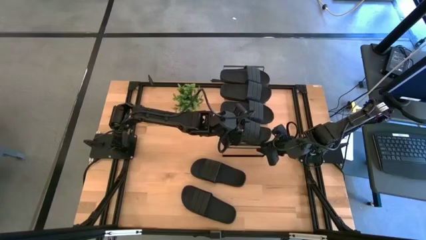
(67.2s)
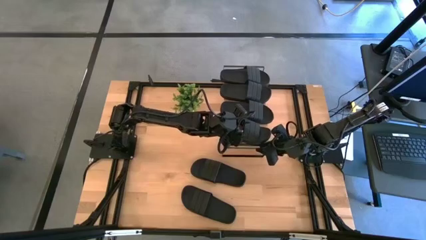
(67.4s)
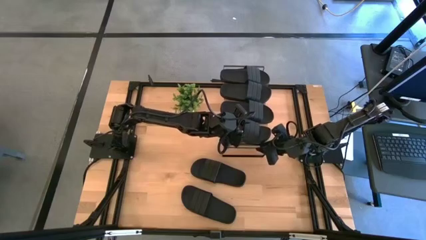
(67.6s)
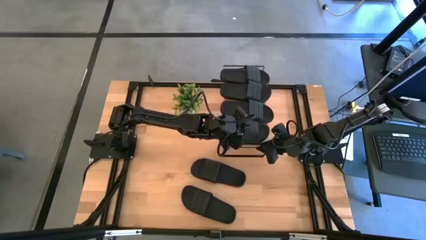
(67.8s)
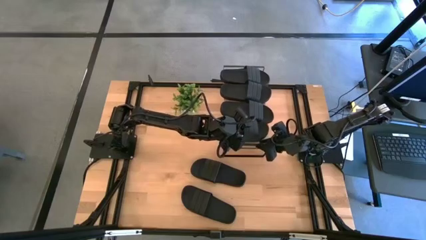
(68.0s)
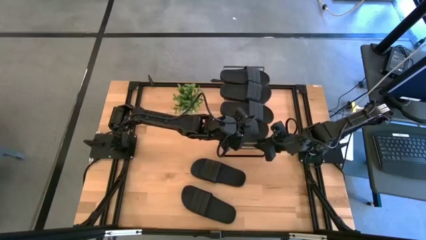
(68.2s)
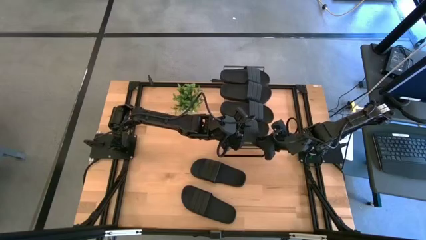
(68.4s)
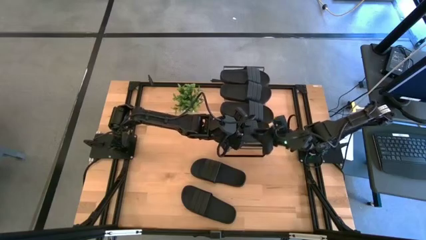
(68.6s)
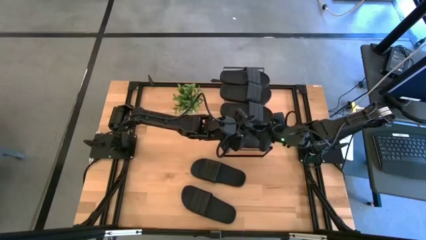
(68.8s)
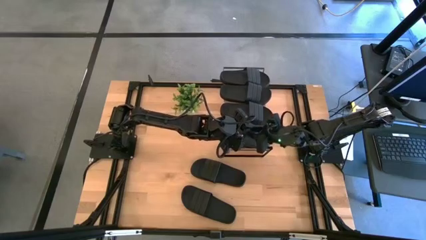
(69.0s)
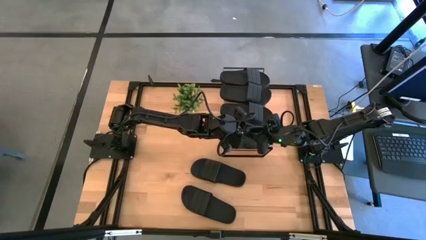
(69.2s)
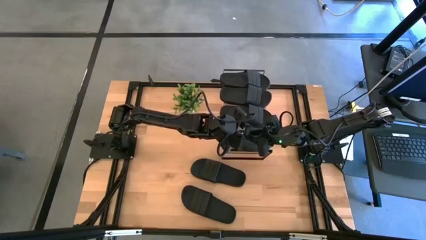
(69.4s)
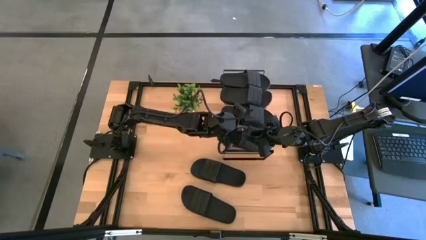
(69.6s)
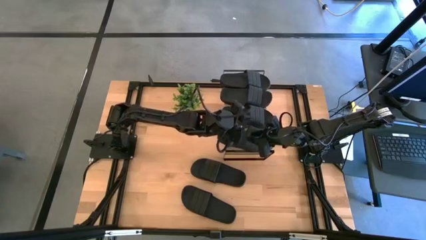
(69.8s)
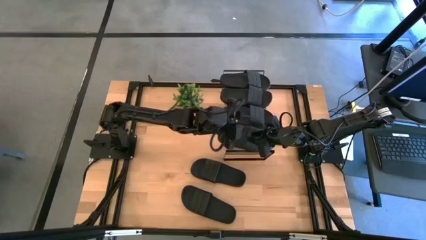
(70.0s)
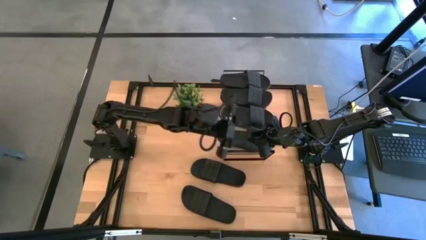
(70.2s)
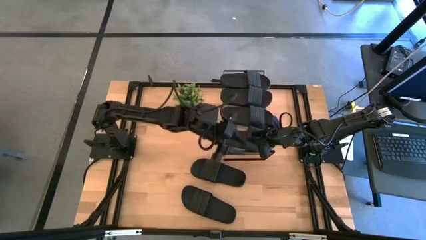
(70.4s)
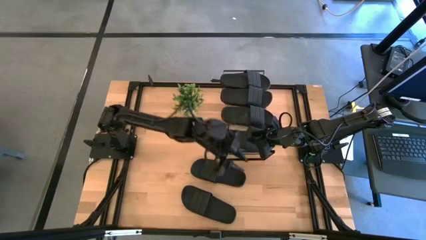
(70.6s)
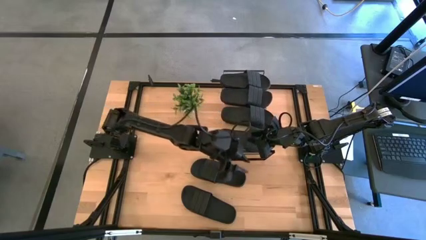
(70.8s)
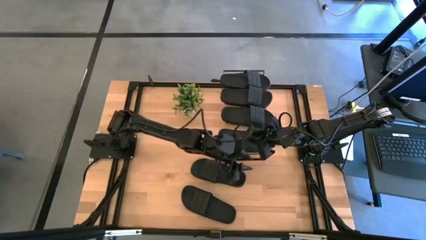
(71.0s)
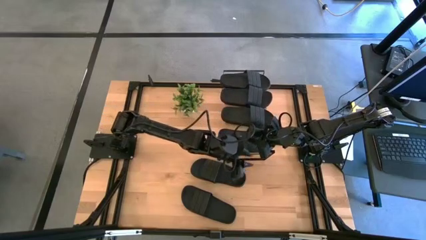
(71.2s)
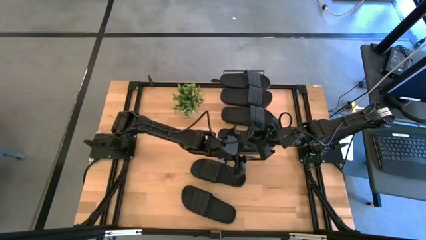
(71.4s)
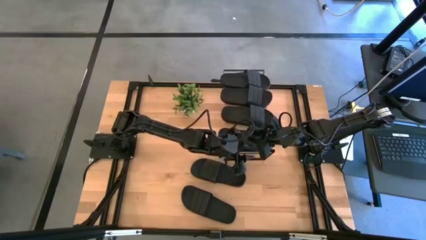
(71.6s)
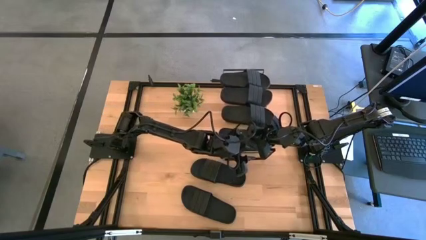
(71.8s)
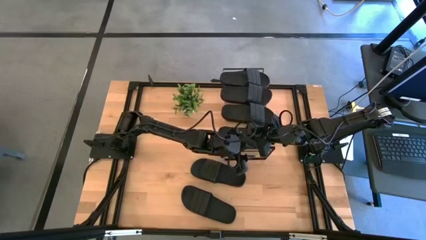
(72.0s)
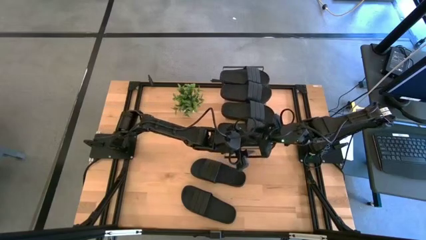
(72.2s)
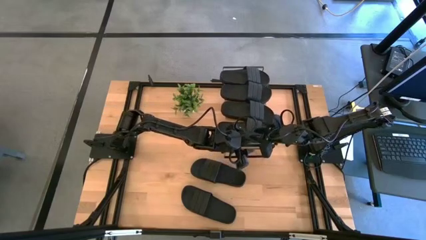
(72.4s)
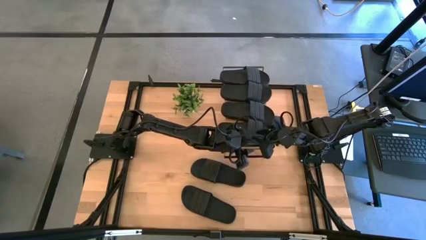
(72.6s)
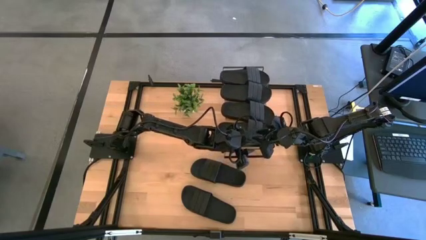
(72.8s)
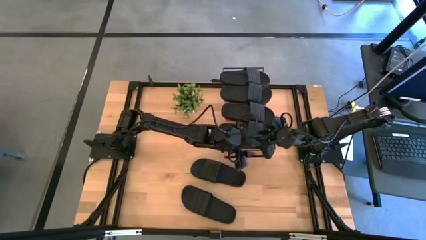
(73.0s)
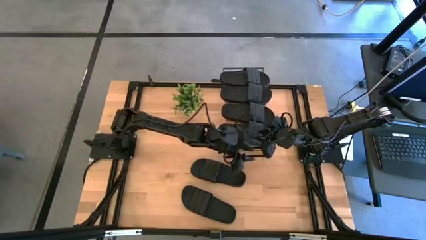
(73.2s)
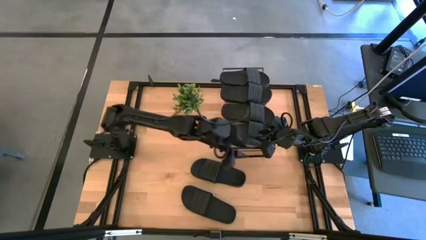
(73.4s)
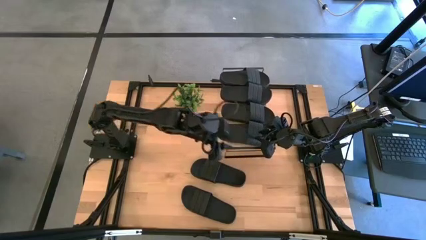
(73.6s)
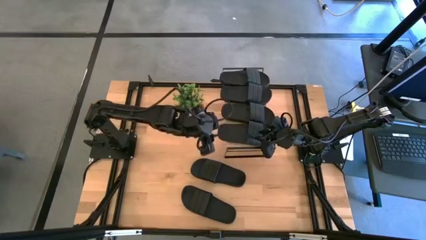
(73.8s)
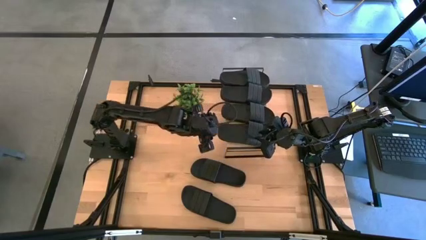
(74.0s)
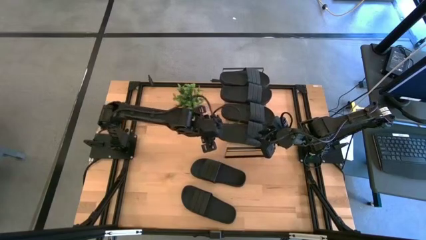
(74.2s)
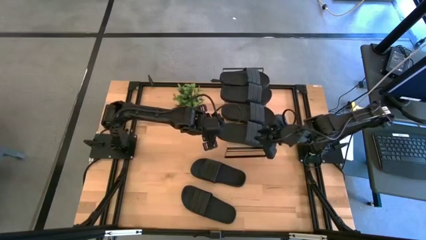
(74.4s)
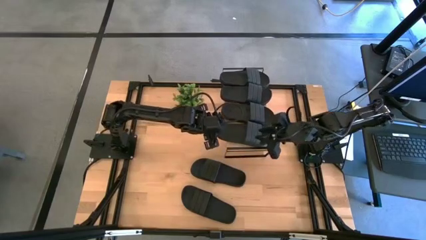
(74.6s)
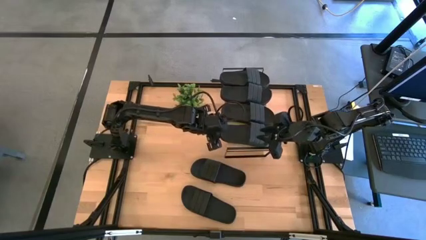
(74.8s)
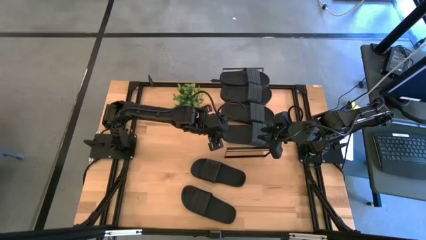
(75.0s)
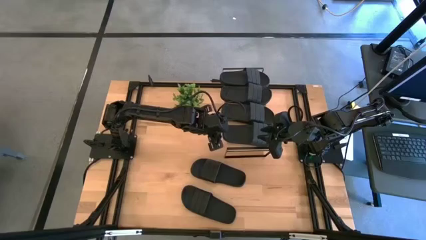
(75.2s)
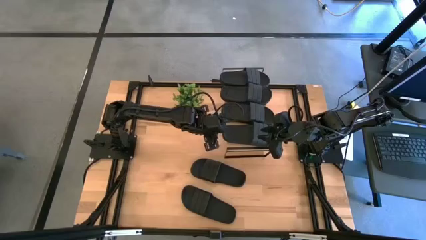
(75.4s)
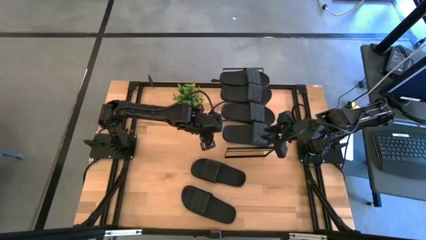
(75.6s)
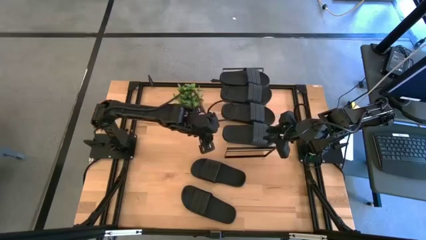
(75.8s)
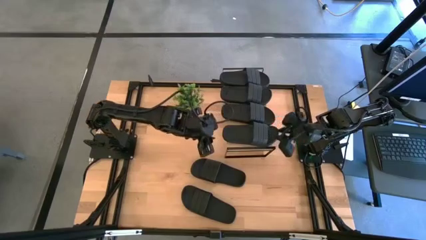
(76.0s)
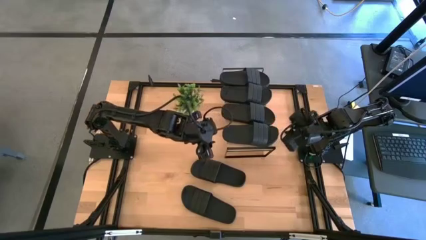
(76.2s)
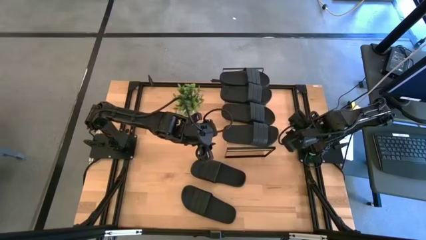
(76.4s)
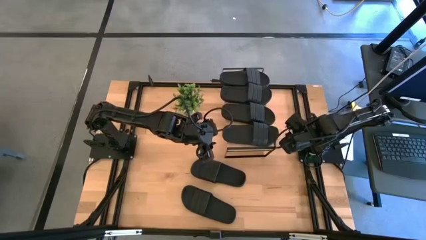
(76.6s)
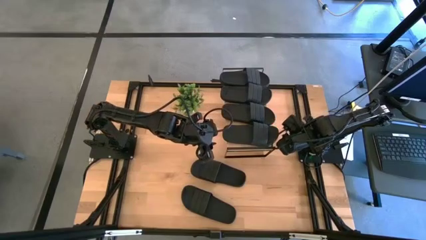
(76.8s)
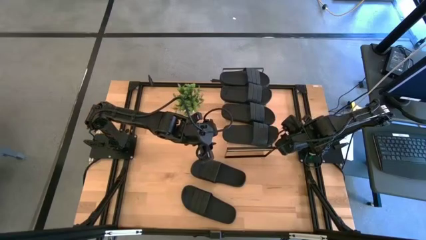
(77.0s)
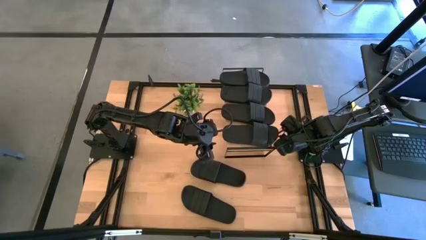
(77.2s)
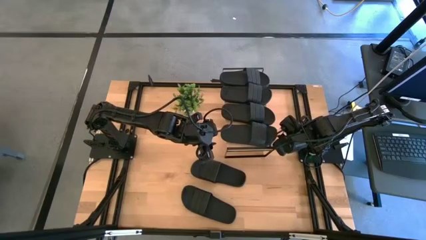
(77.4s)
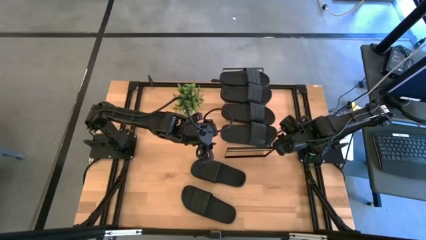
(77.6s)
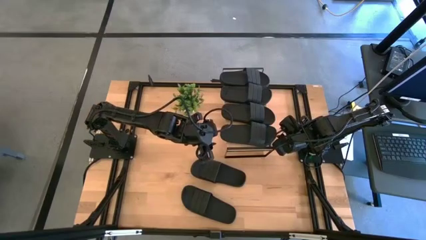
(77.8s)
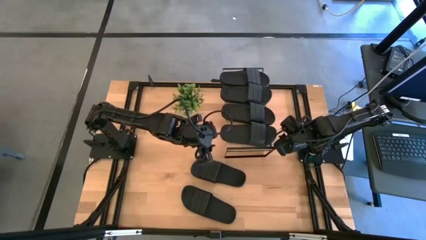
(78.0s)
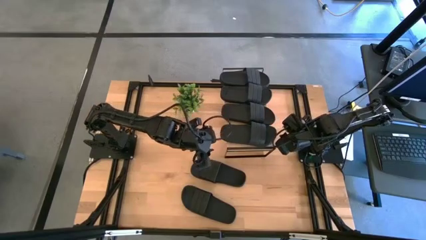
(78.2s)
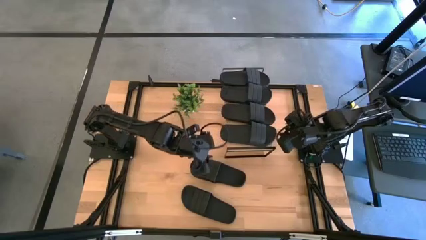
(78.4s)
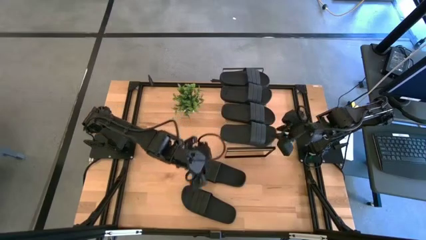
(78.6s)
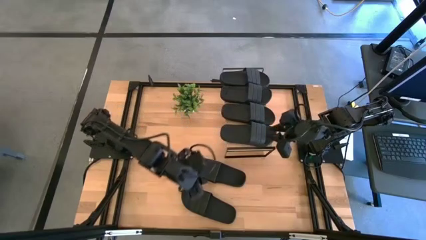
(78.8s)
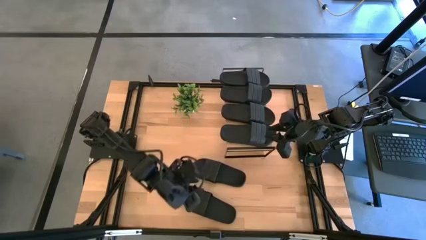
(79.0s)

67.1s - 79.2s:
Task: Pick and place slides into the shelf
Put the black slide on the shelf
